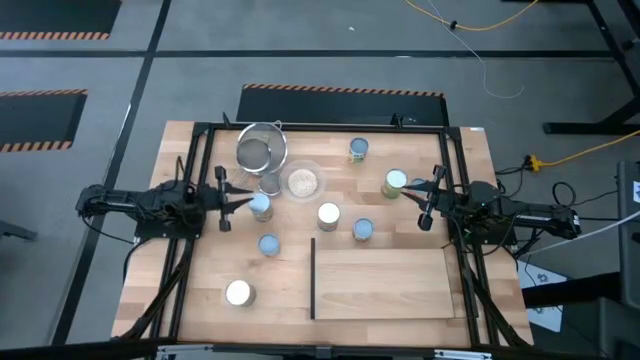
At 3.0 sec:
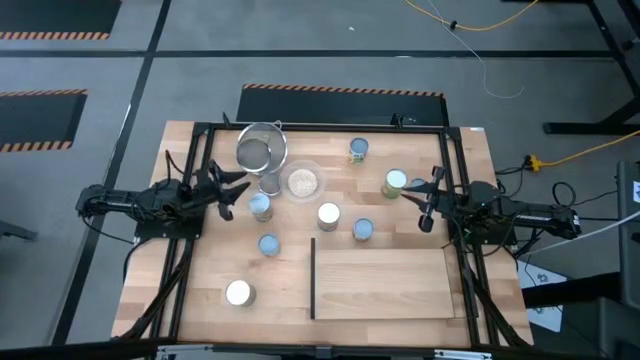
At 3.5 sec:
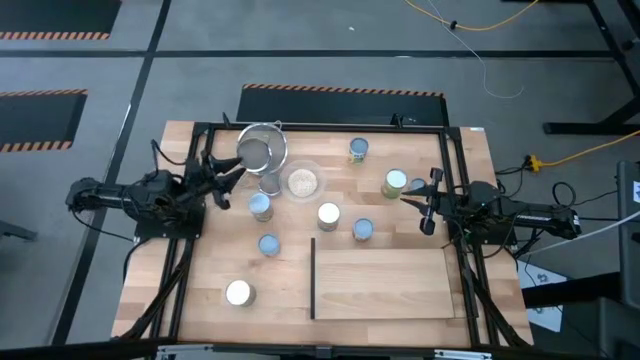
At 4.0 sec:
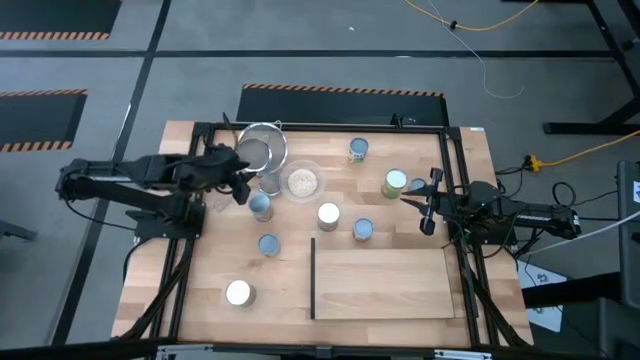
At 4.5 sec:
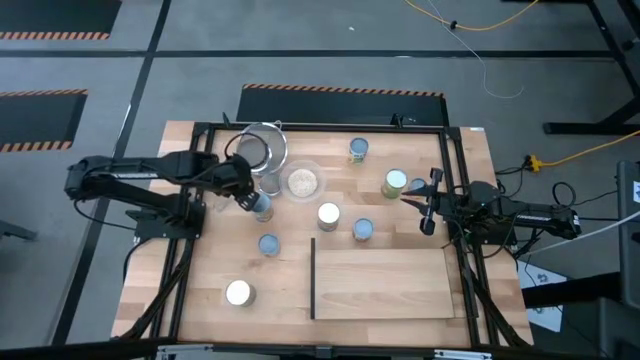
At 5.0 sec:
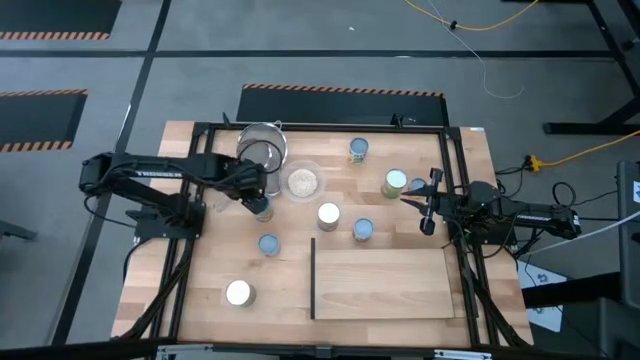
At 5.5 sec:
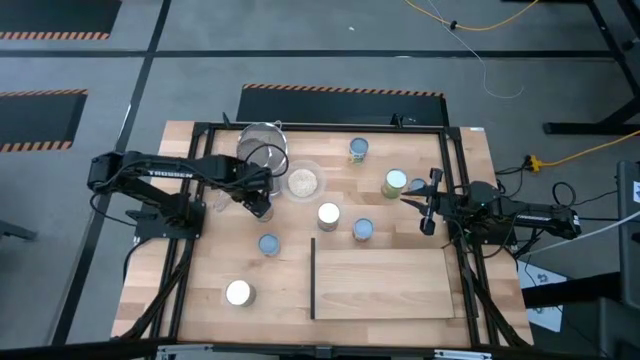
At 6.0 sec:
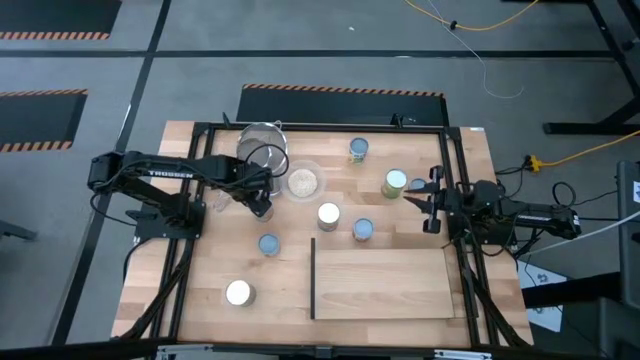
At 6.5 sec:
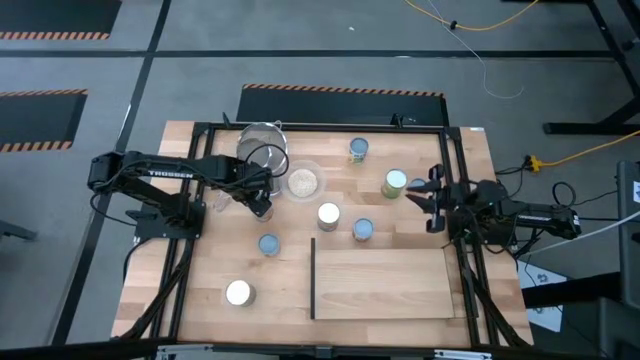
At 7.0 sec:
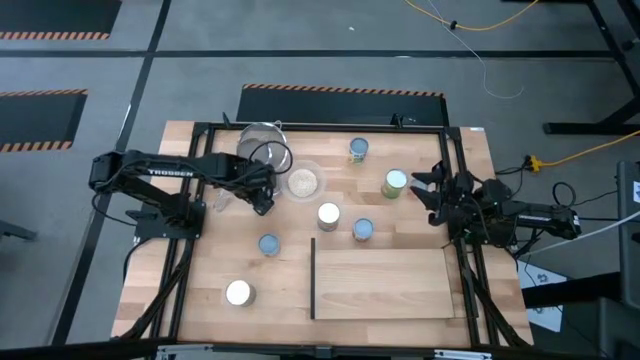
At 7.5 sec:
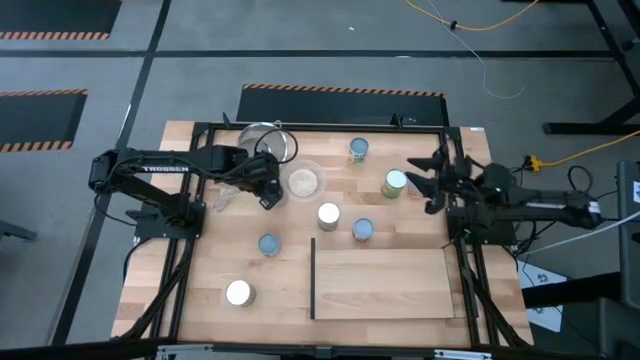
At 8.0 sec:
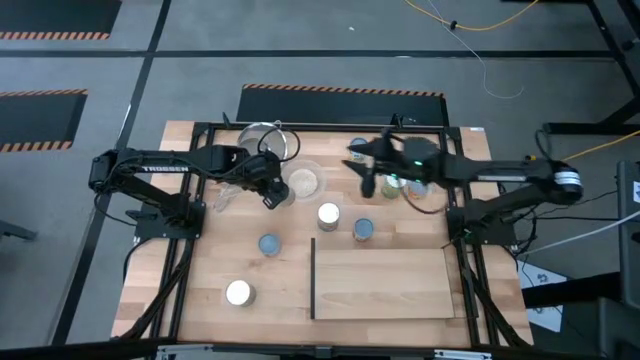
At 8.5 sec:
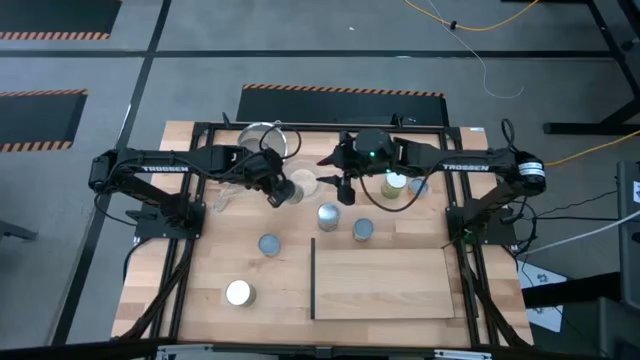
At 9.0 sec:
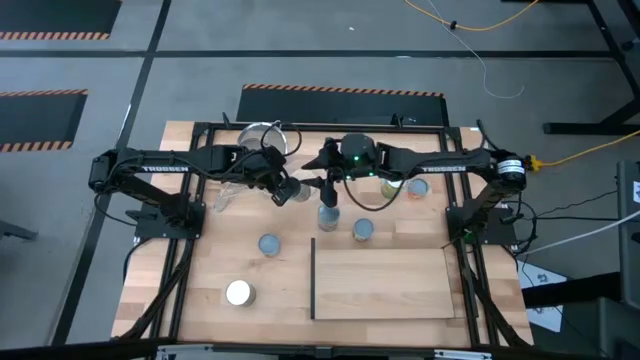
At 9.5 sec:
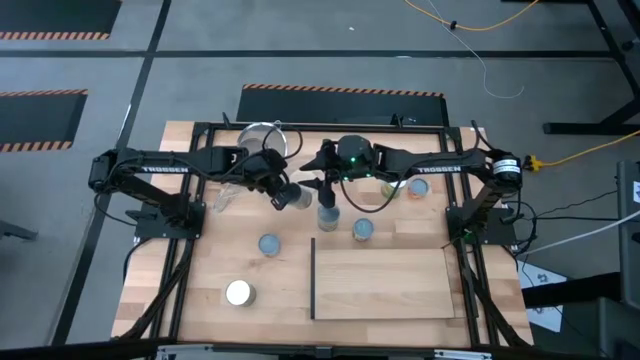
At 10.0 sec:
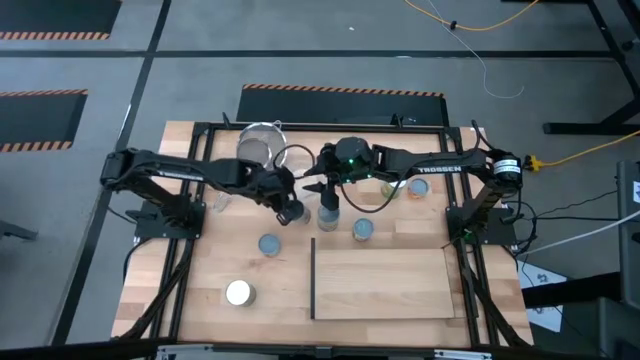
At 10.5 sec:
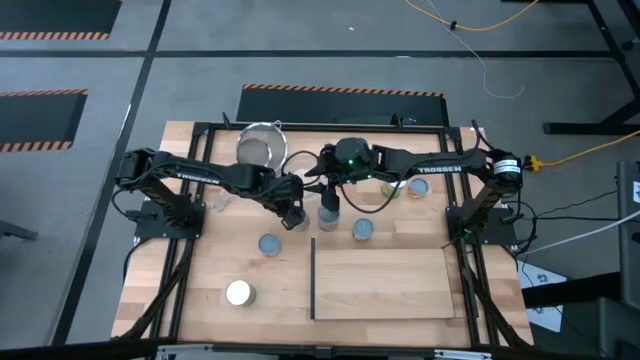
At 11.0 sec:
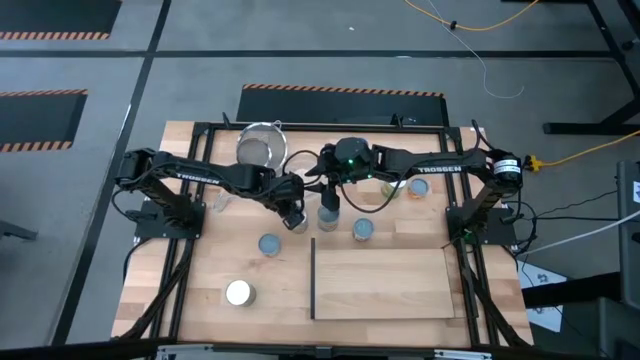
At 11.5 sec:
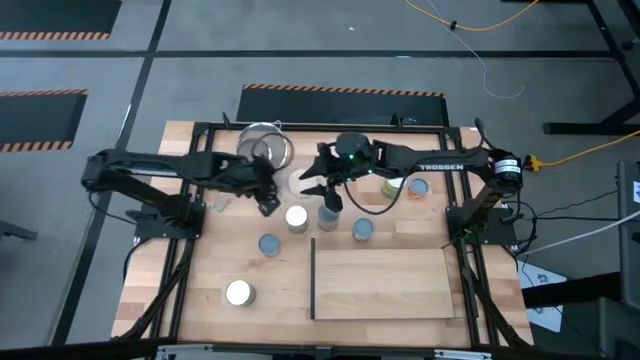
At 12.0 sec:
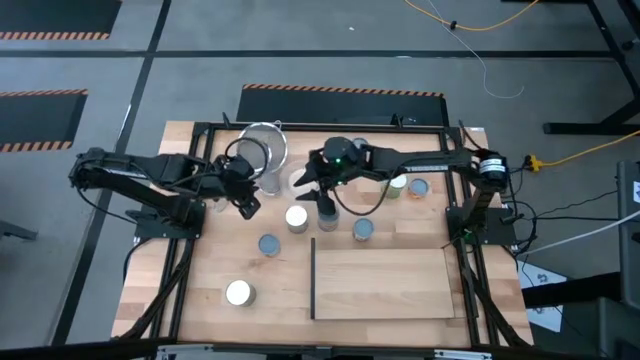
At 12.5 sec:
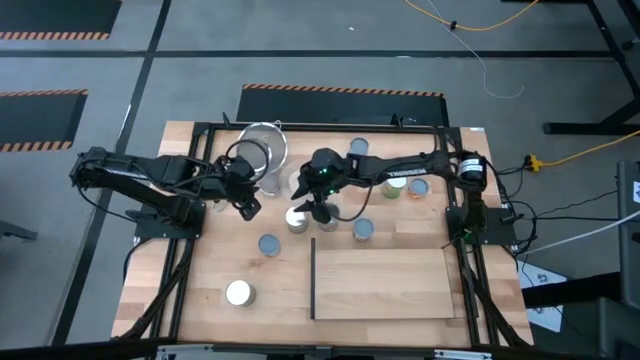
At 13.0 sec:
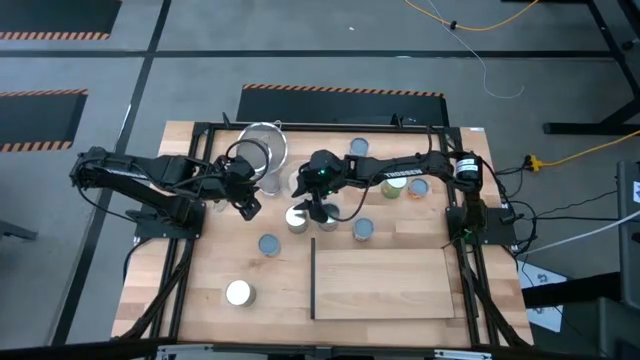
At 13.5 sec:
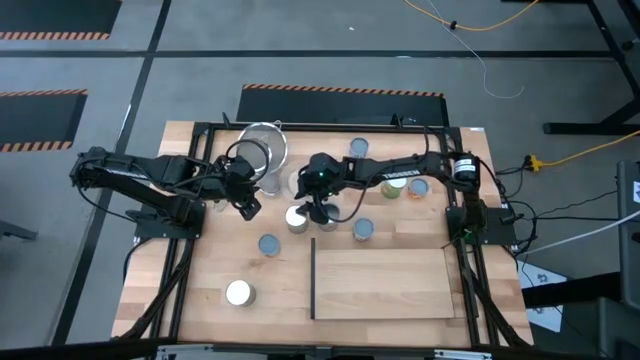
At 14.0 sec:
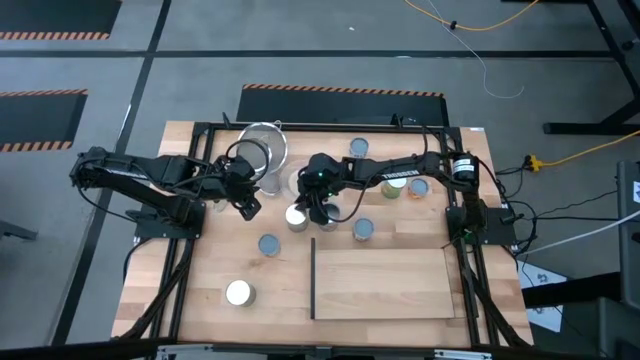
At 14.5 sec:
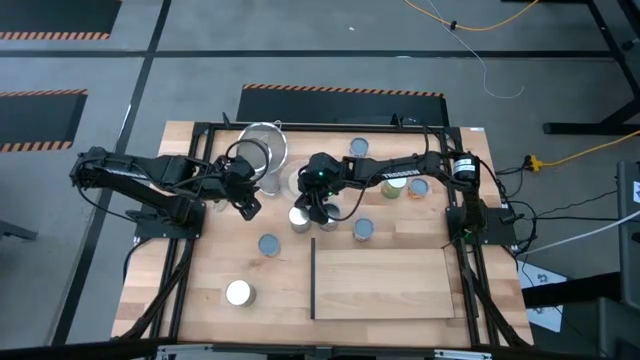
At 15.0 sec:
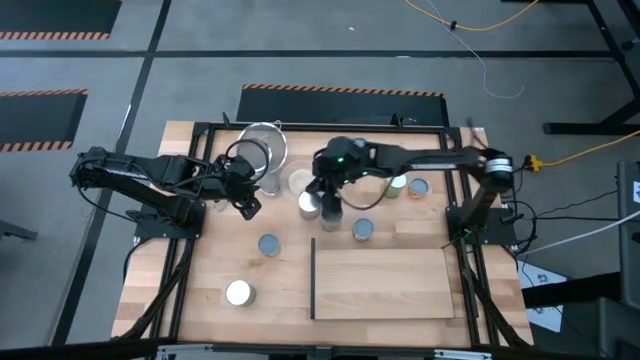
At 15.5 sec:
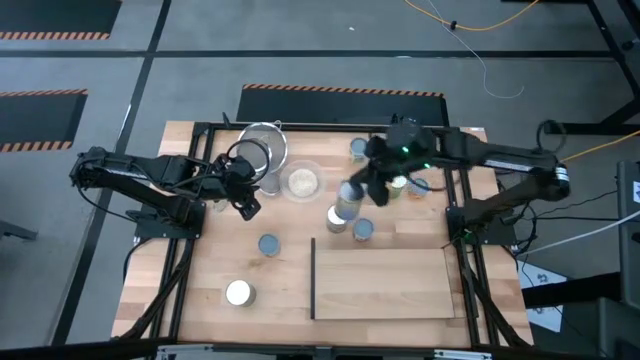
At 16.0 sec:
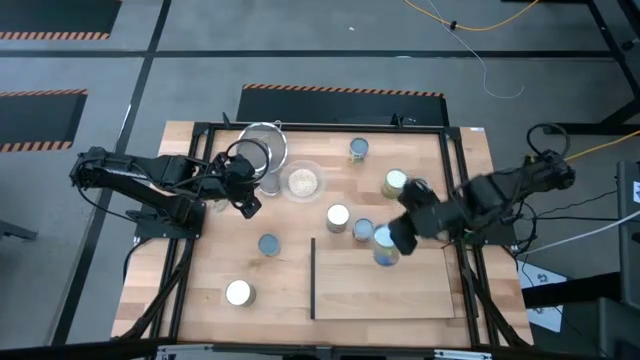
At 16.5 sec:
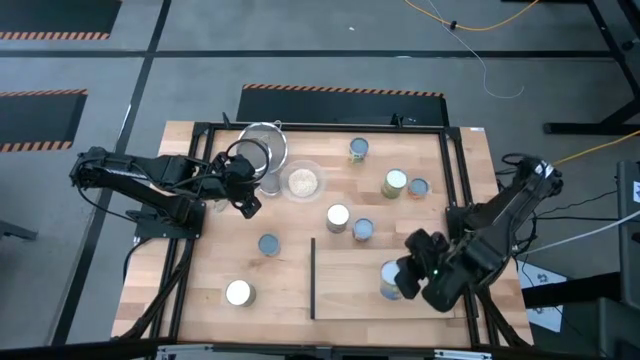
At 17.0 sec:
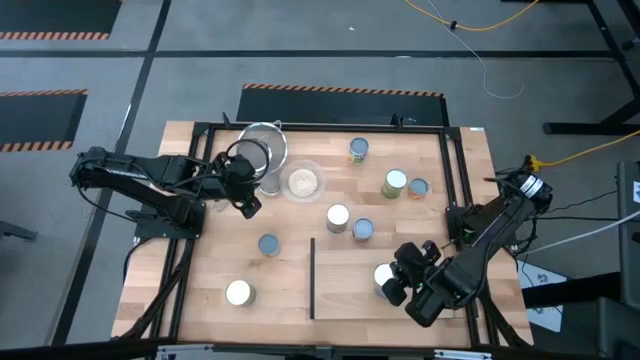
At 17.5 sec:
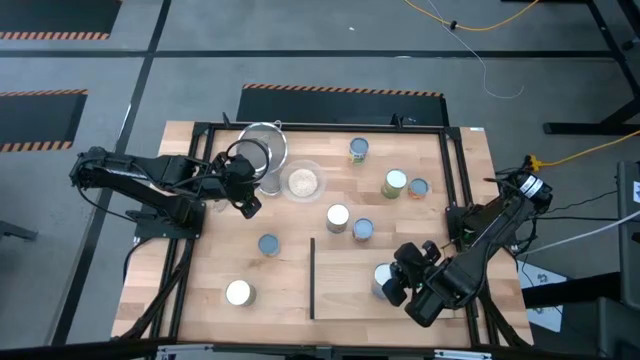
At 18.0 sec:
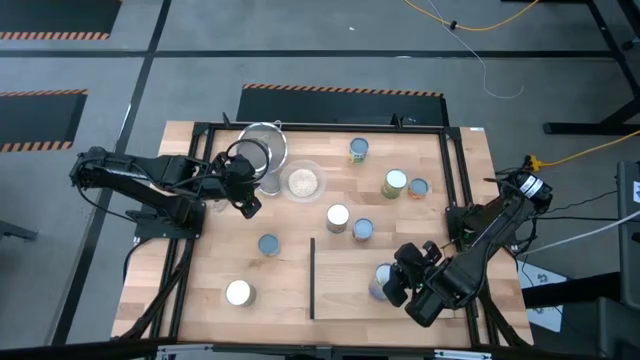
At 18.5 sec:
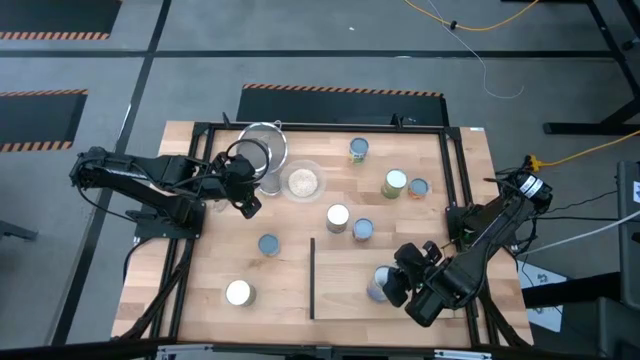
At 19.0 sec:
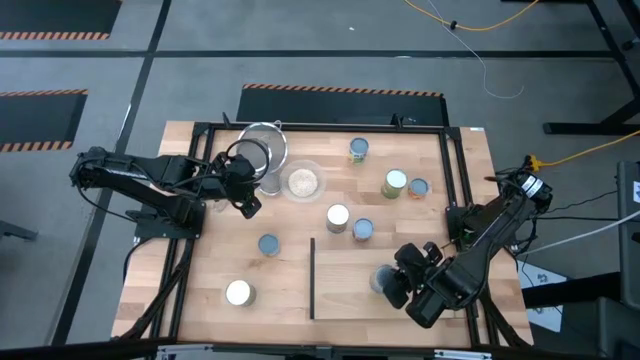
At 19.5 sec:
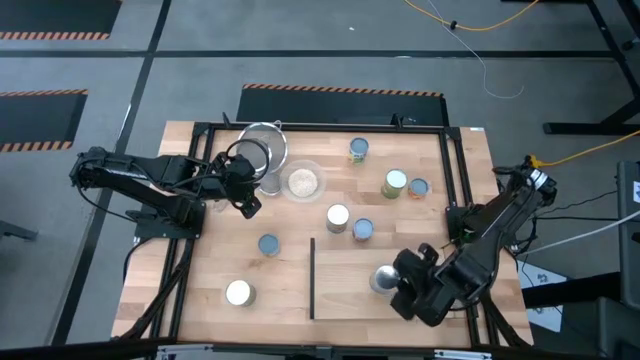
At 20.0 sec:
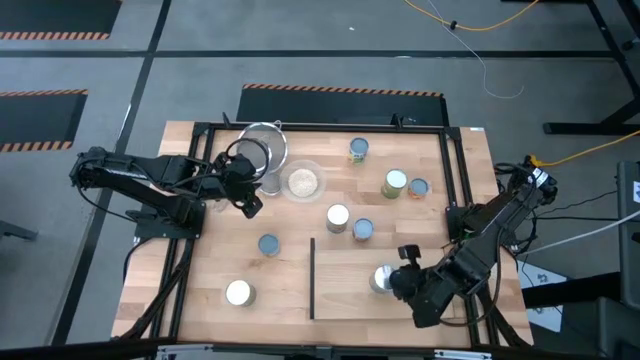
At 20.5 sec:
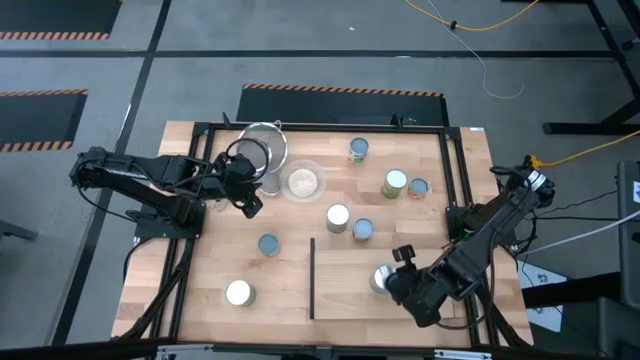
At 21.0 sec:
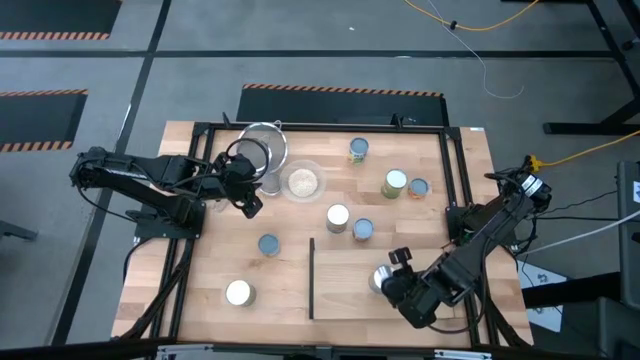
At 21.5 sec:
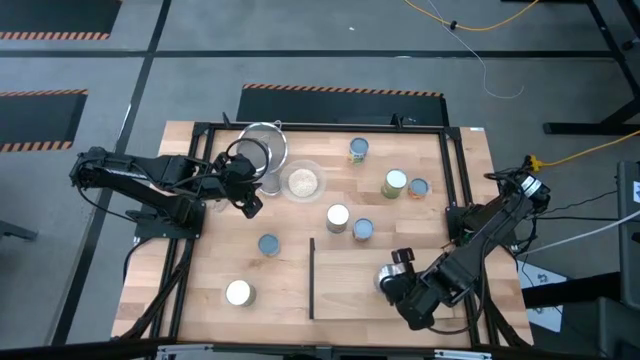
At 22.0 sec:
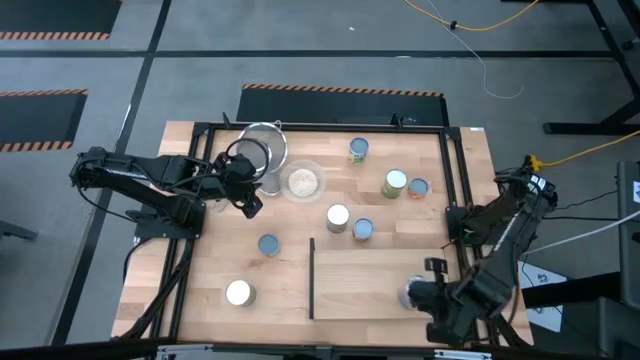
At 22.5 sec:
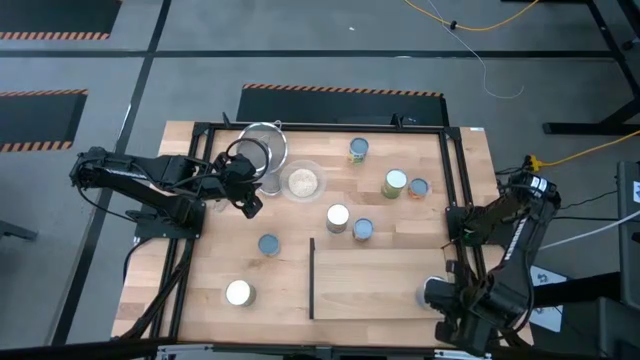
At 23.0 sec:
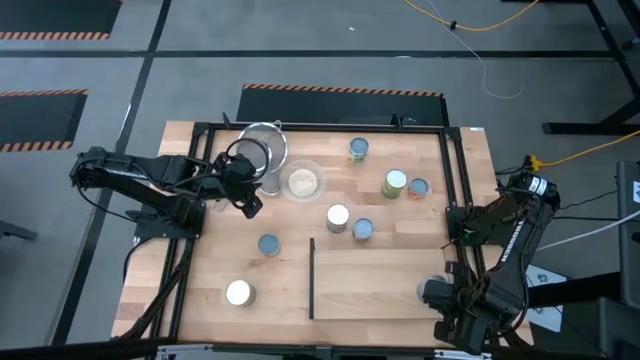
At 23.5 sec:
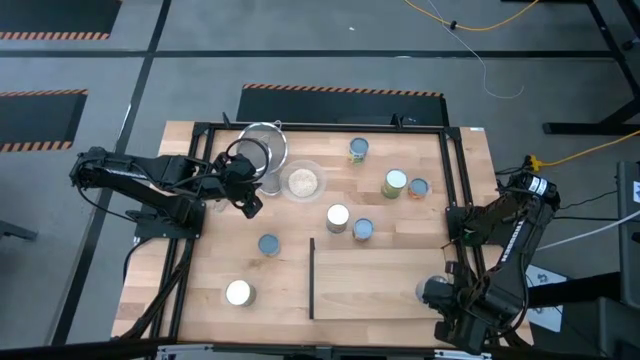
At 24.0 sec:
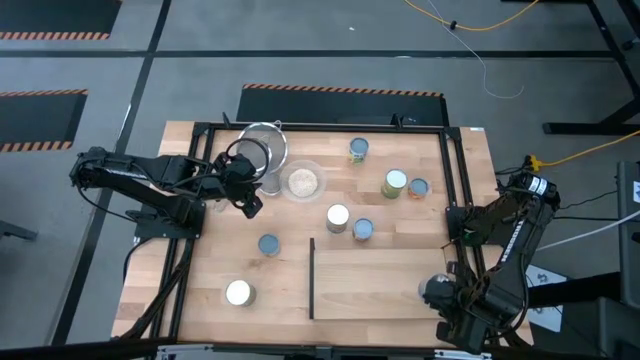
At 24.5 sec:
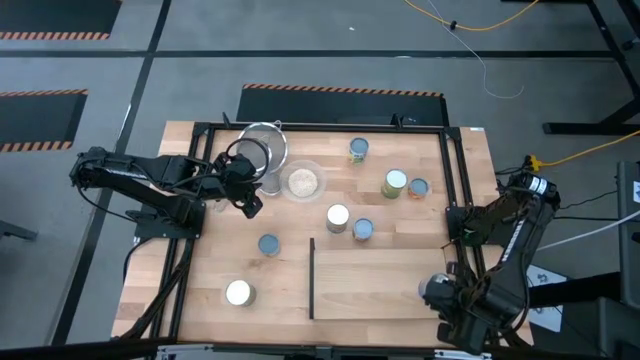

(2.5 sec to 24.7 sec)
Task: Pick and place cans onto a shelf
Put the blue can on the shelf
